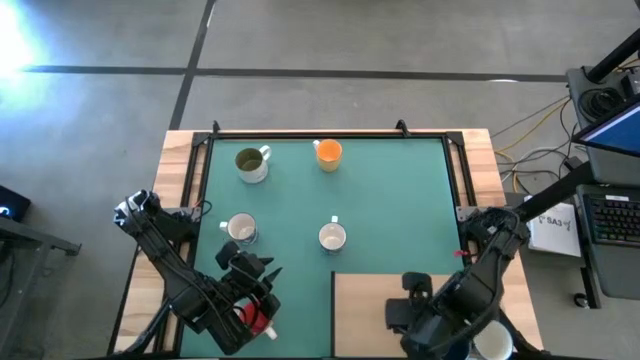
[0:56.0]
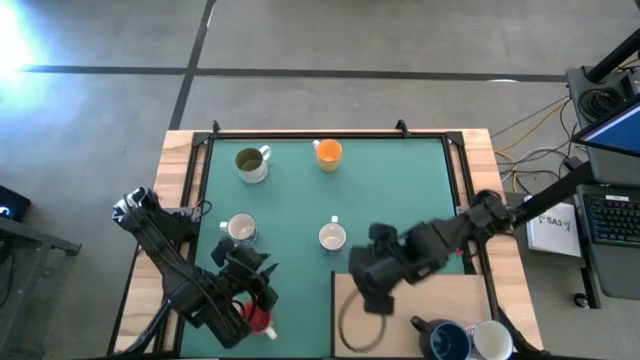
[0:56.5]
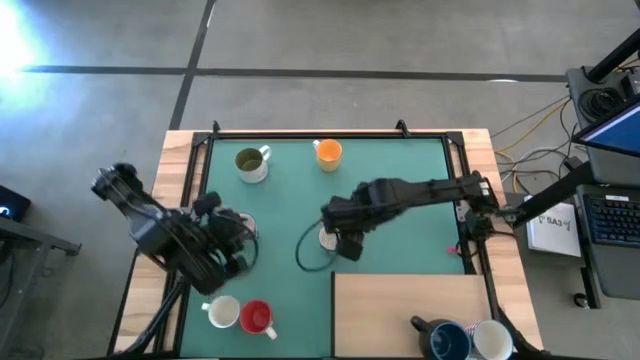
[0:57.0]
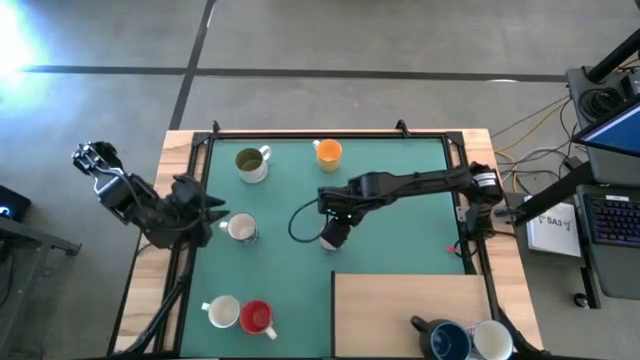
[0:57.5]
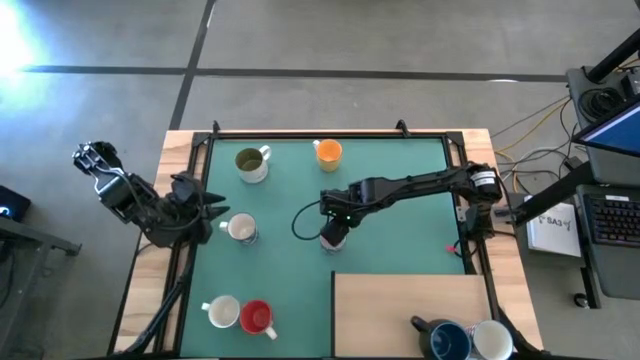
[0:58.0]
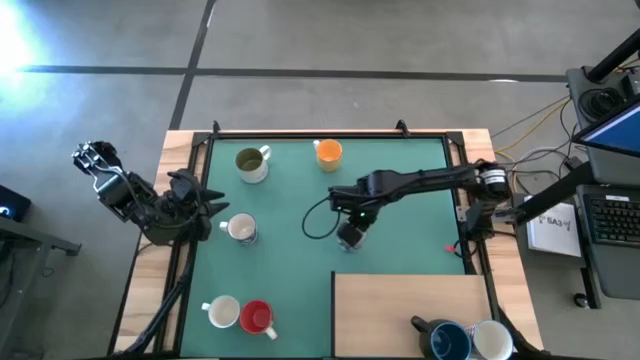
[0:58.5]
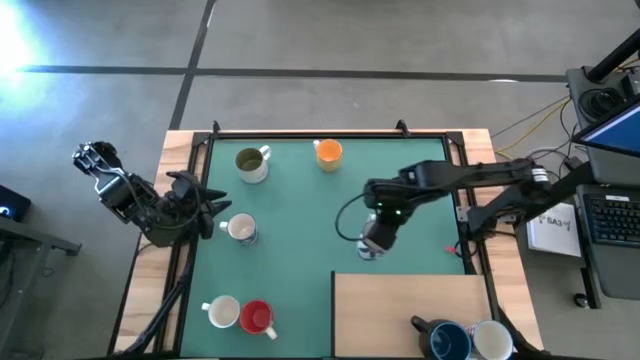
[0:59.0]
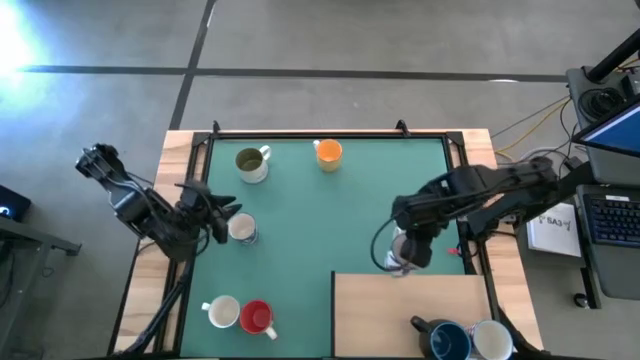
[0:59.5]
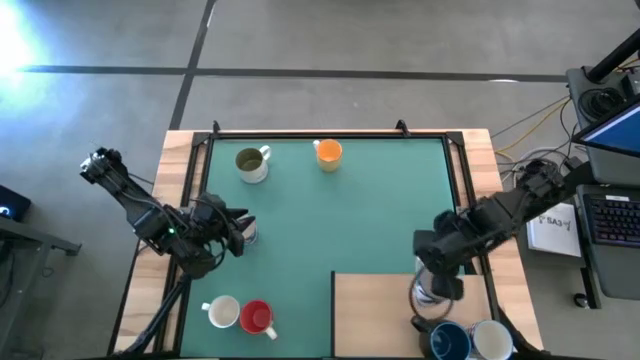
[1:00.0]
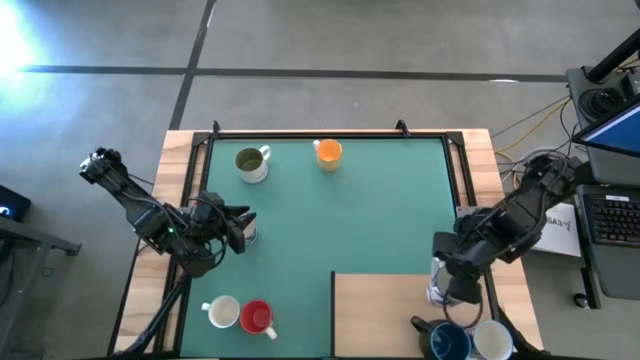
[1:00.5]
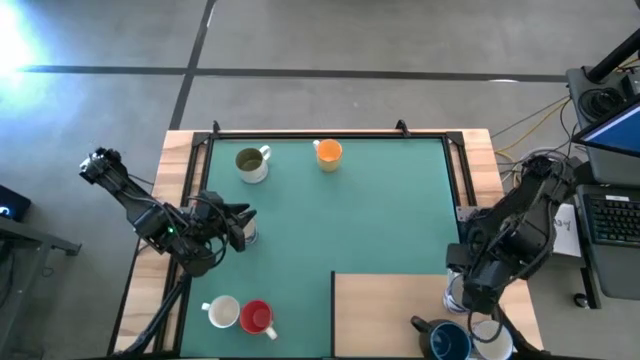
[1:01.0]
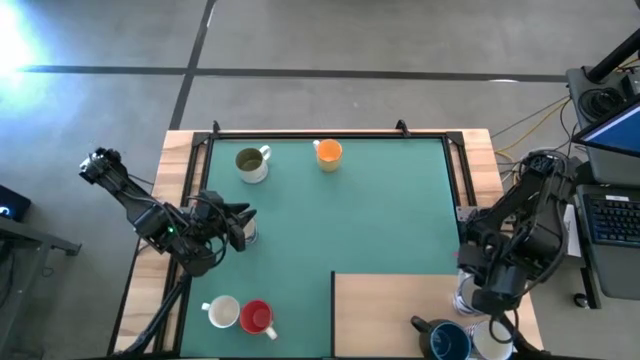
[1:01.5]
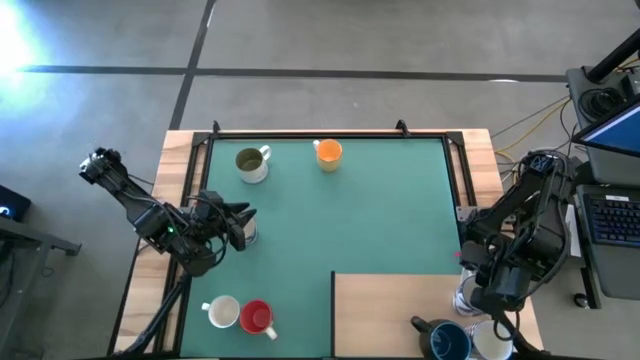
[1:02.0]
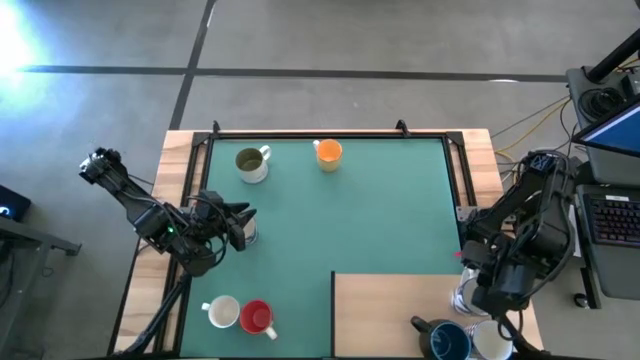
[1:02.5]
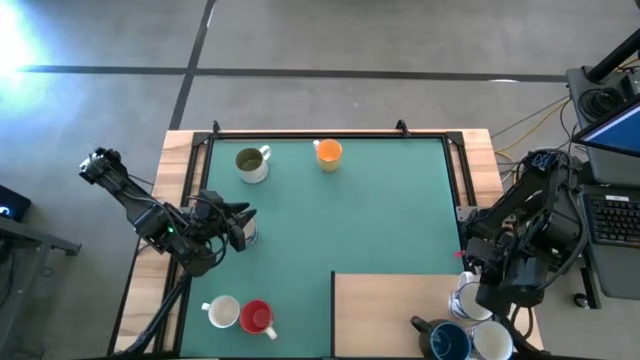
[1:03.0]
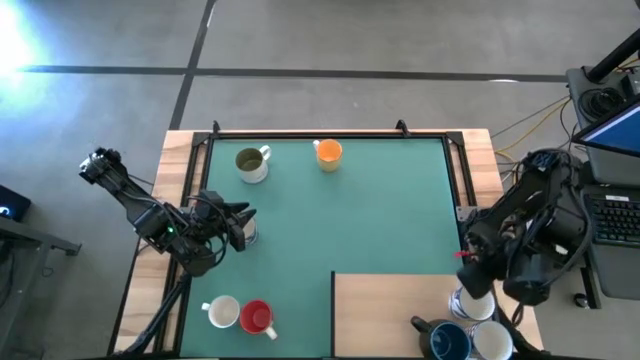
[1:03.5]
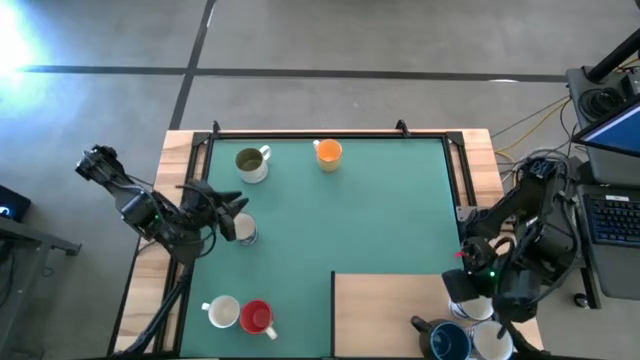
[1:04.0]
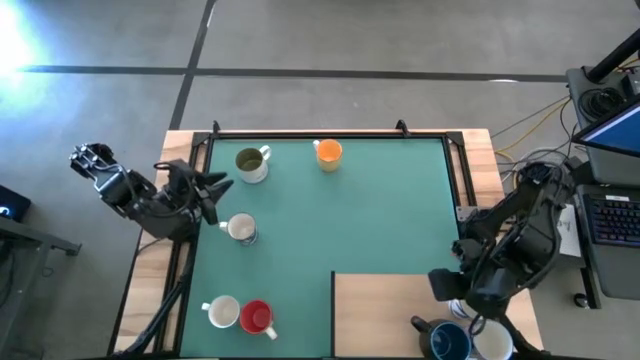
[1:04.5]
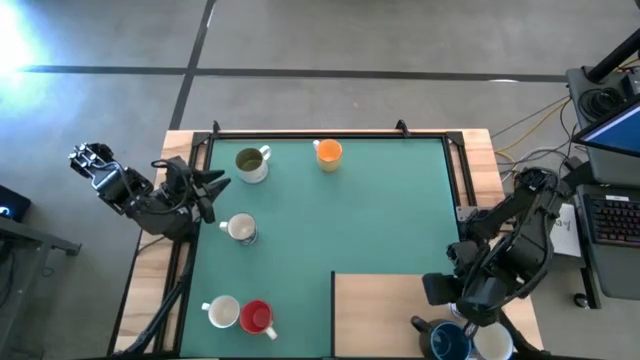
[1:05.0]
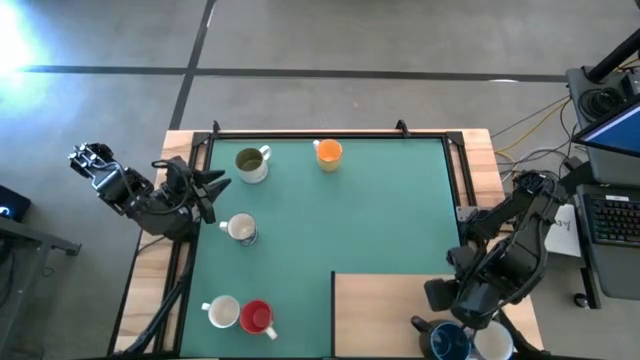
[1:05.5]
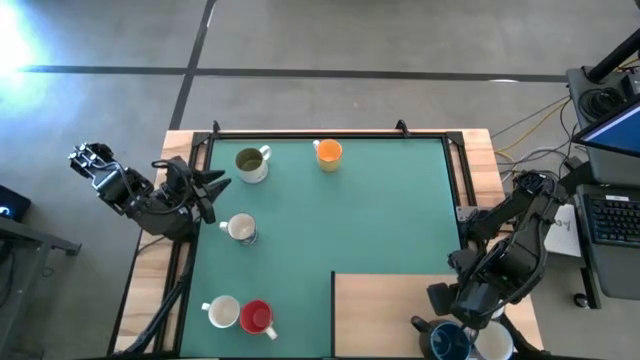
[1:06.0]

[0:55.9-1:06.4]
Task: Place coffee mugs
Put the right blue patterned mug on the shelf

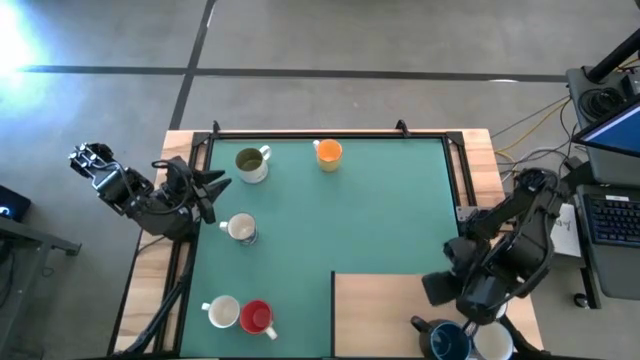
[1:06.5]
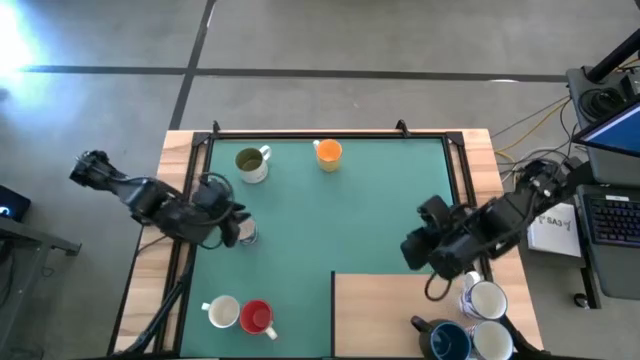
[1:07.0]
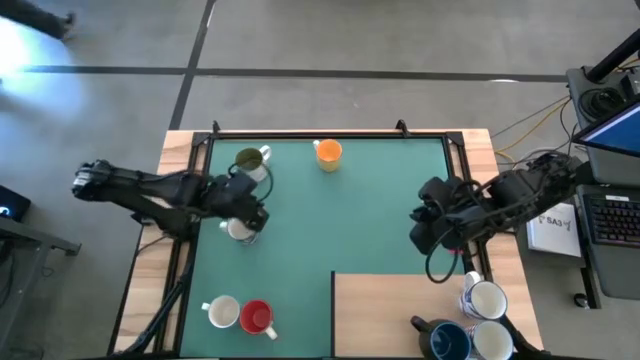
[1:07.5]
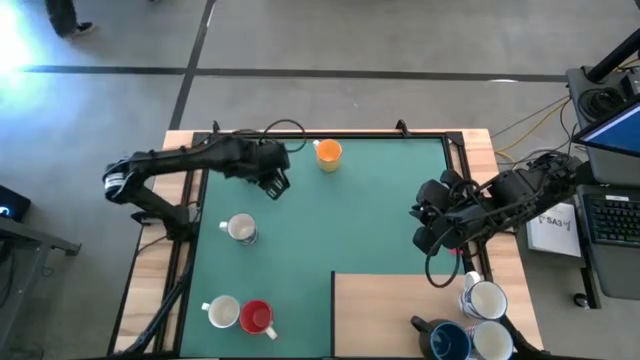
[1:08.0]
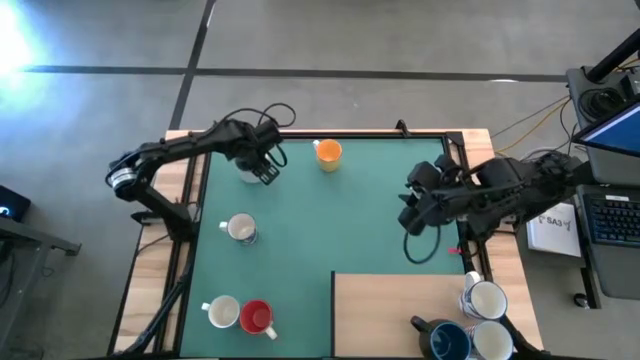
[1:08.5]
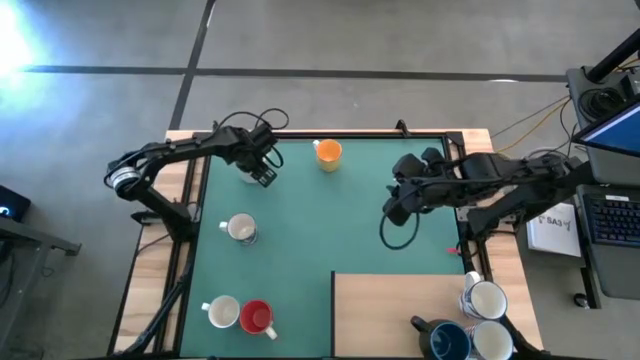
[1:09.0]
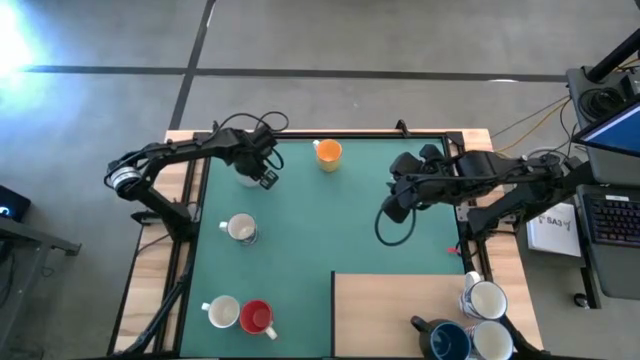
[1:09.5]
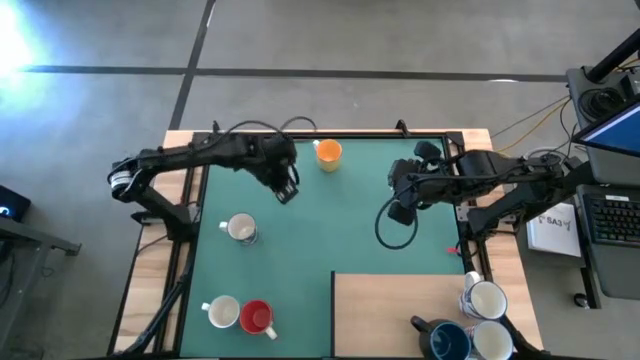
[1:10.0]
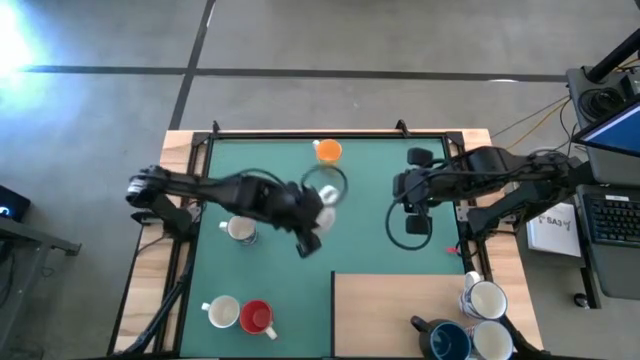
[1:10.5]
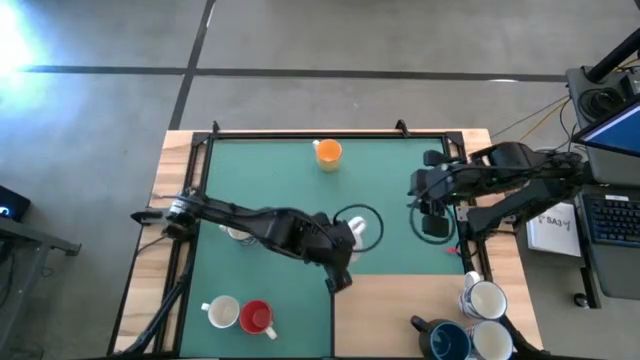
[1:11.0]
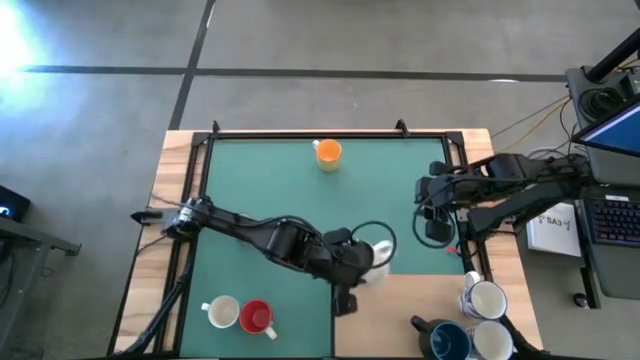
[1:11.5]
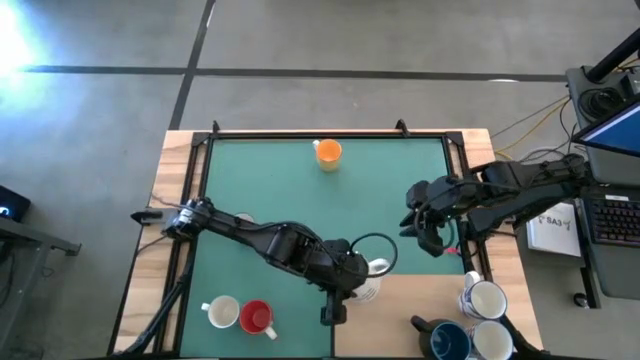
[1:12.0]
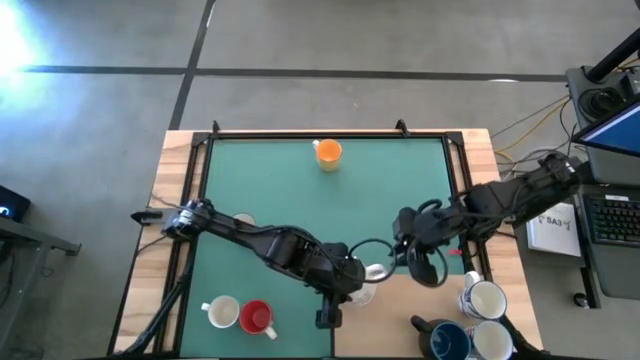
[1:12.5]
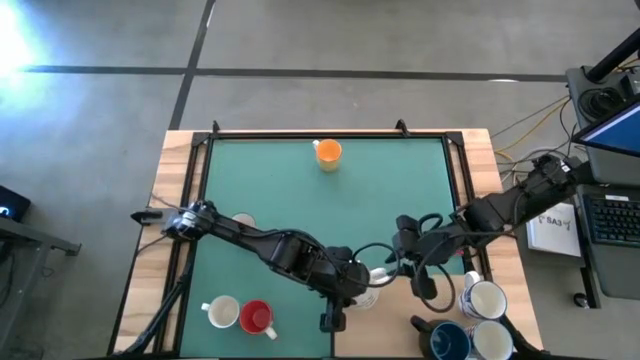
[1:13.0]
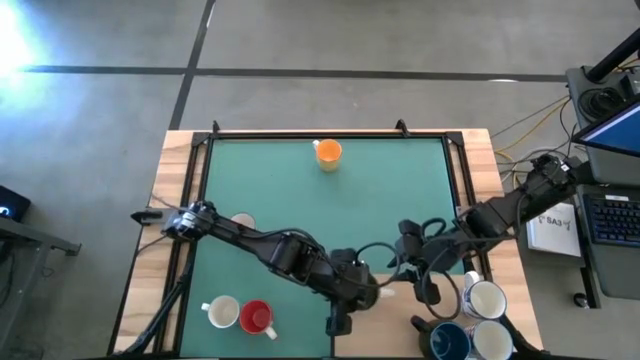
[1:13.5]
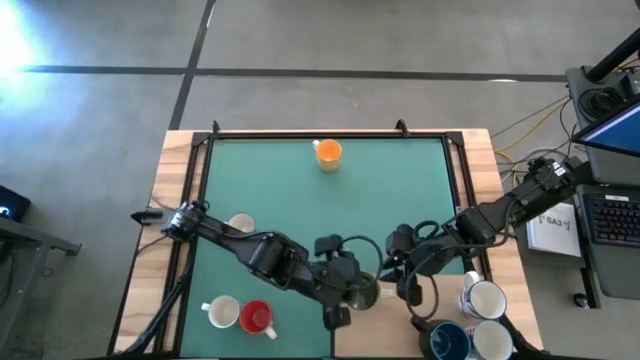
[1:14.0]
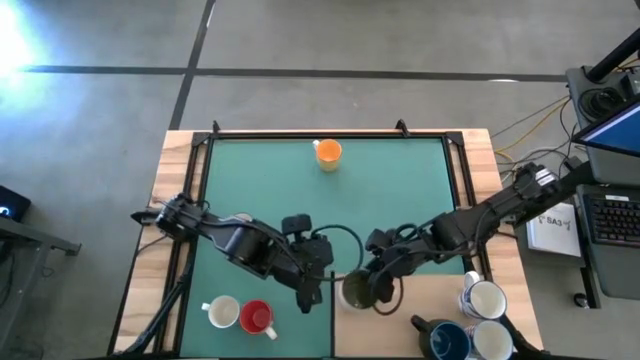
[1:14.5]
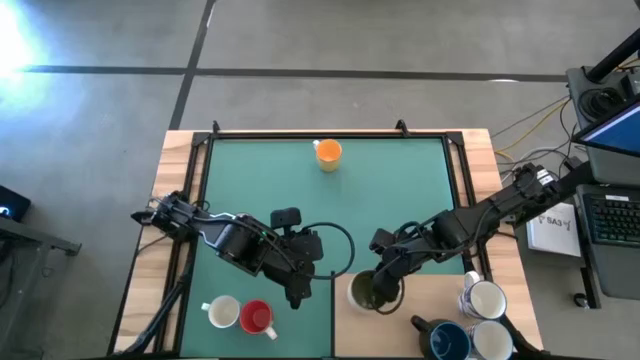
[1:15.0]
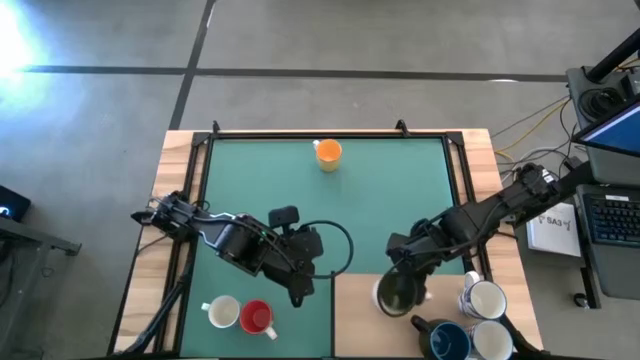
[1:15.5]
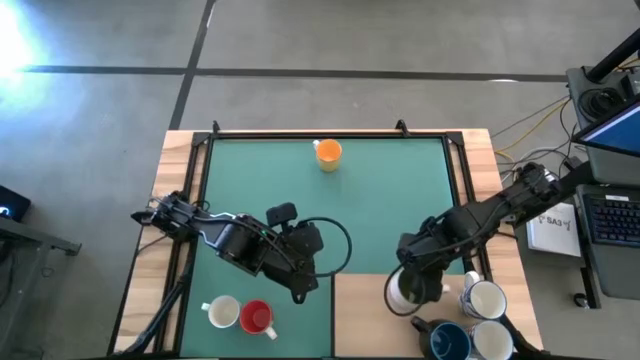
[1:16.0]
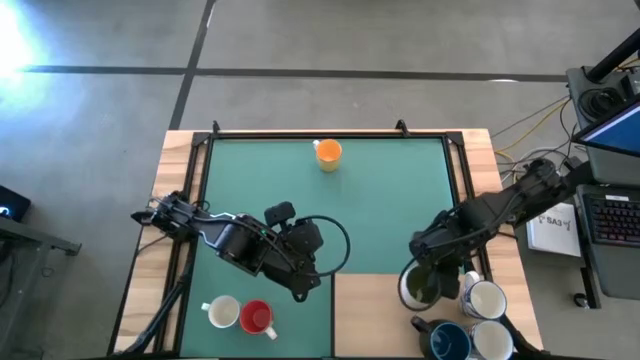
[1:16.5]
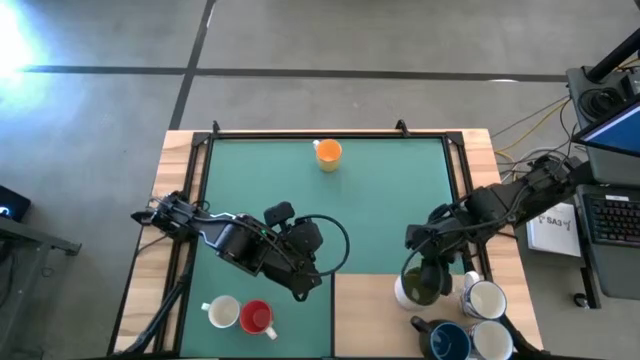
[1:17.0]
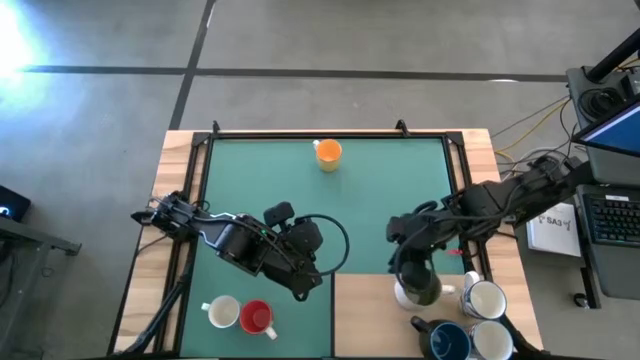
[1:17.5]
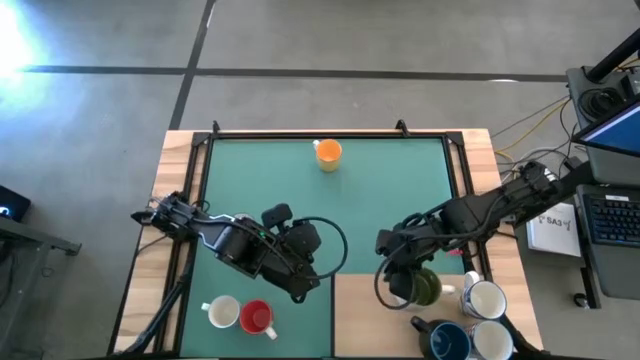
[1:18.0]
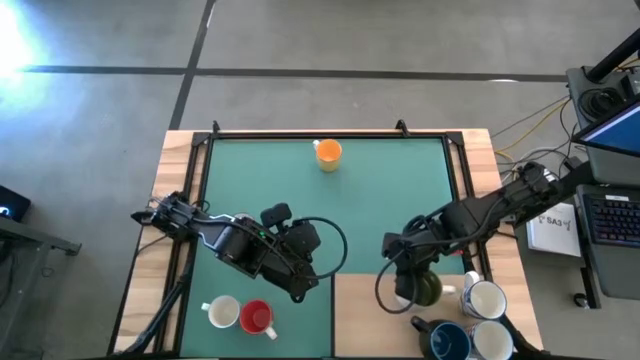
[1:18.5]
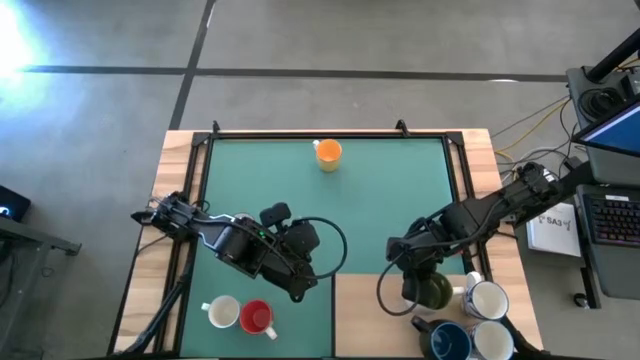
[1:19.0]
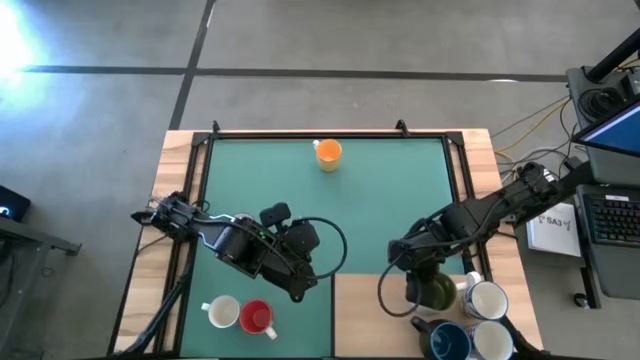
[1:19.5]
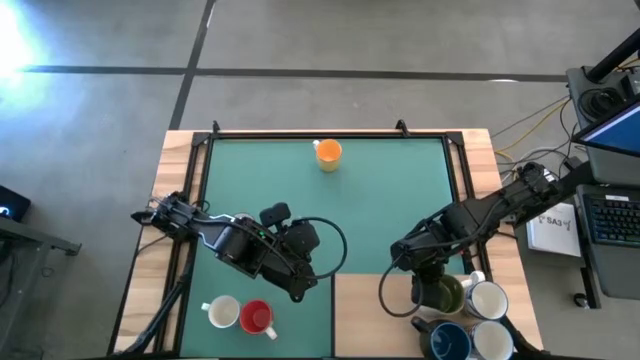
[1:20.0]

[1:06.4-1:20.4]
Put the white mug on the shelf
